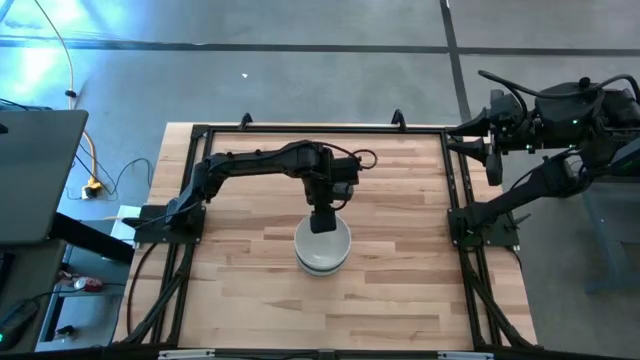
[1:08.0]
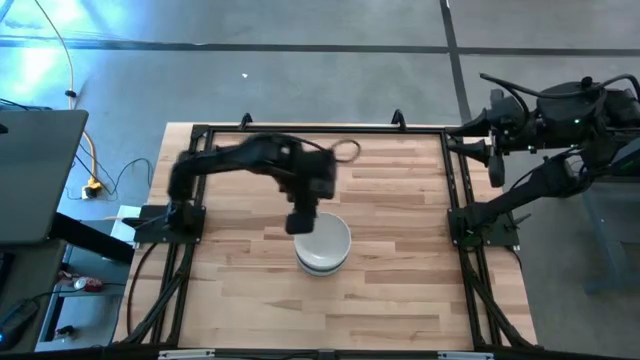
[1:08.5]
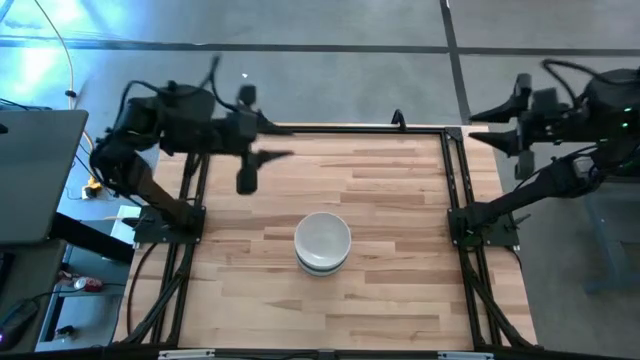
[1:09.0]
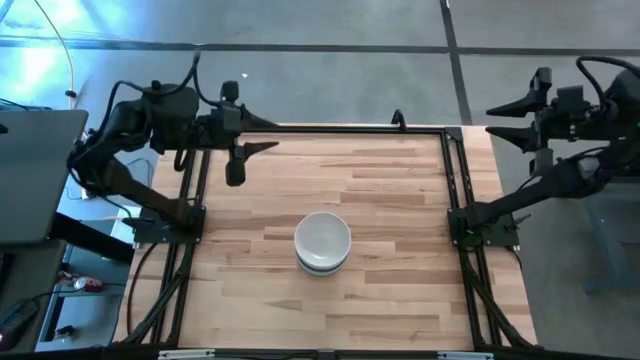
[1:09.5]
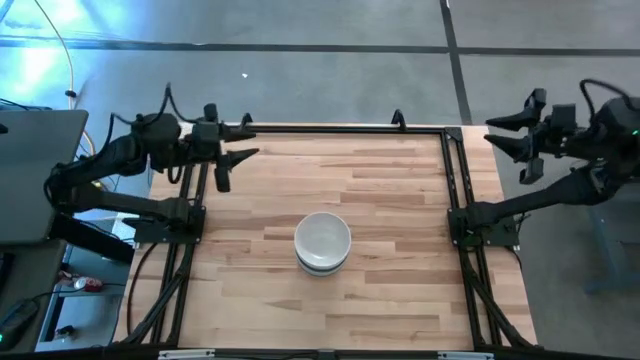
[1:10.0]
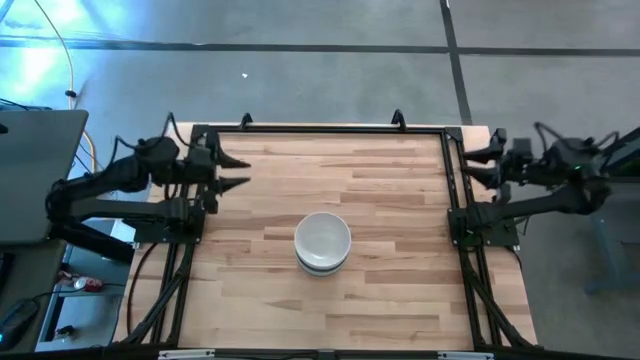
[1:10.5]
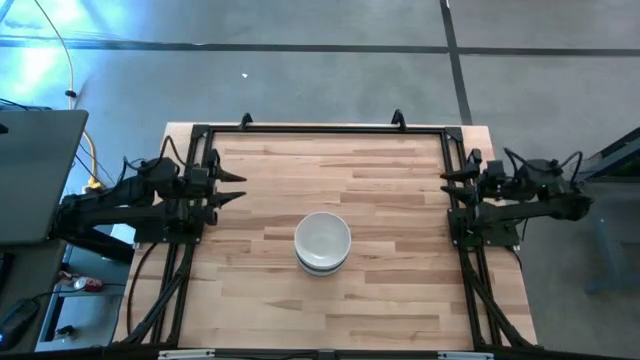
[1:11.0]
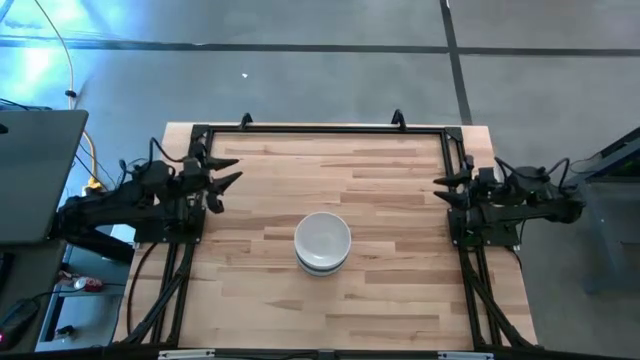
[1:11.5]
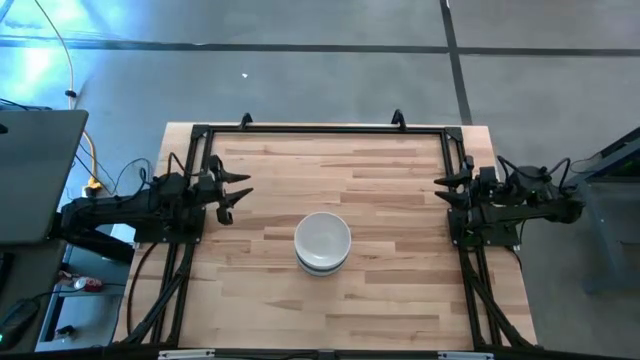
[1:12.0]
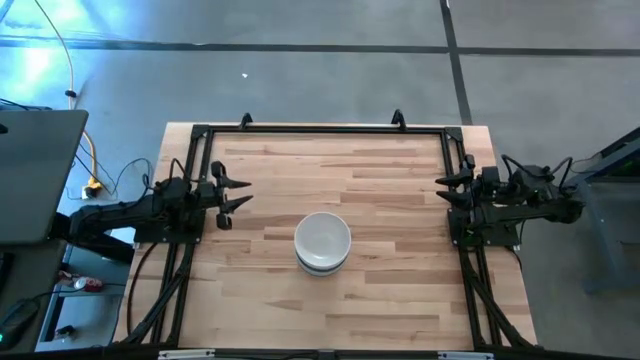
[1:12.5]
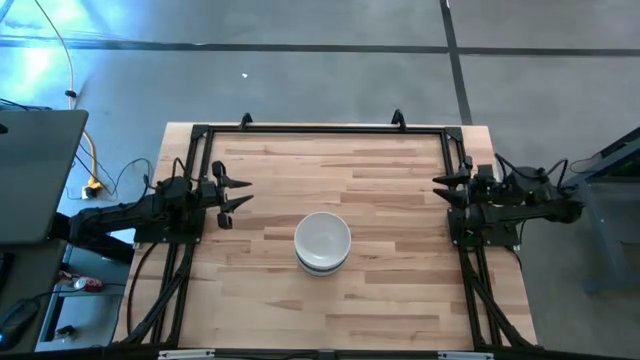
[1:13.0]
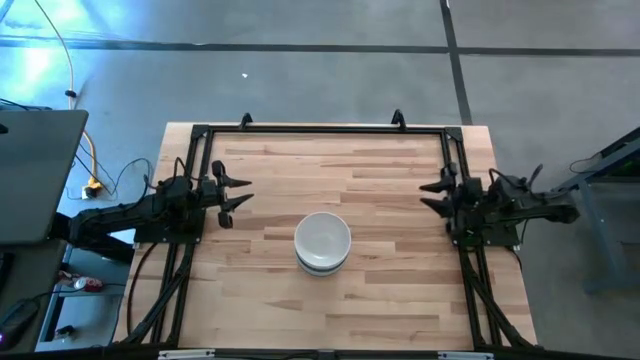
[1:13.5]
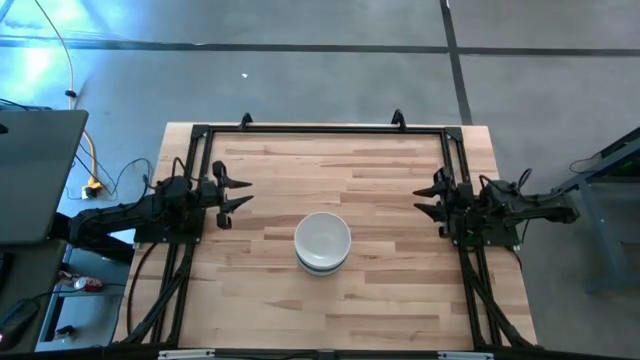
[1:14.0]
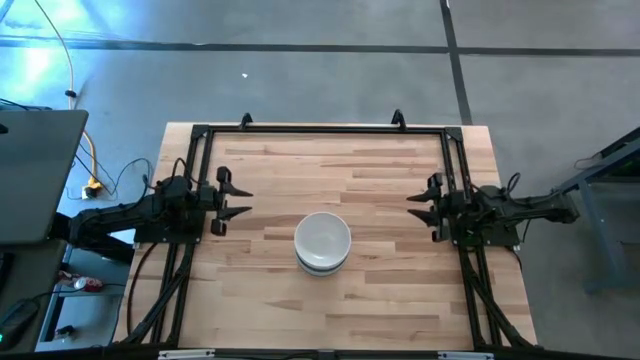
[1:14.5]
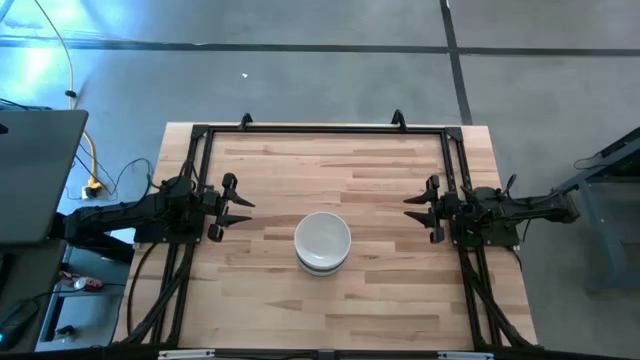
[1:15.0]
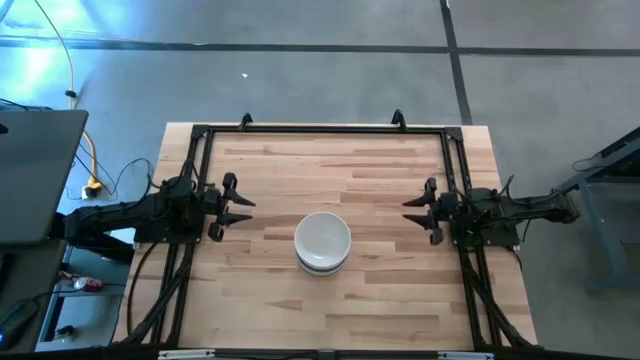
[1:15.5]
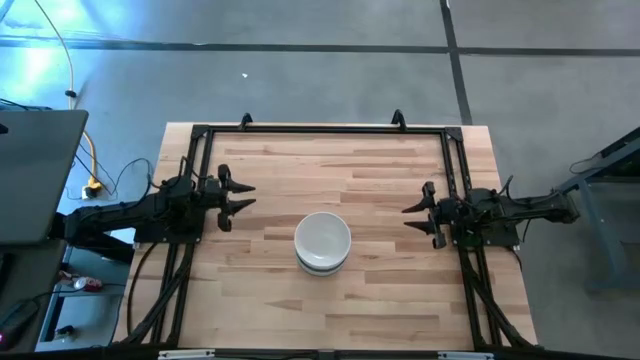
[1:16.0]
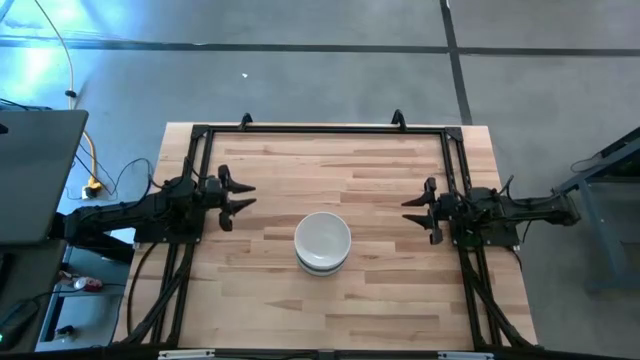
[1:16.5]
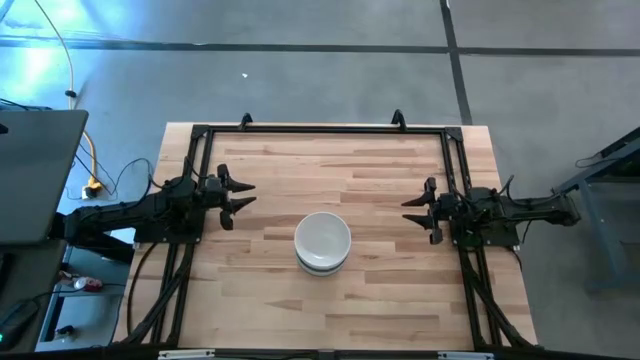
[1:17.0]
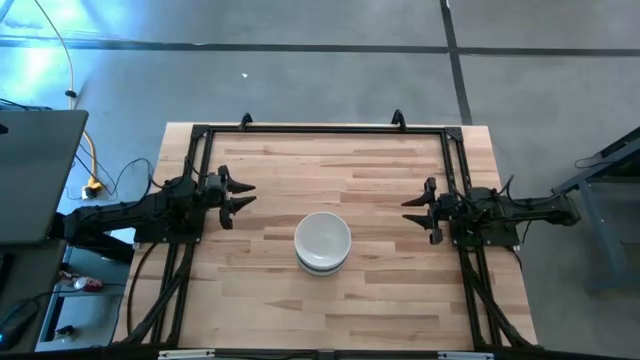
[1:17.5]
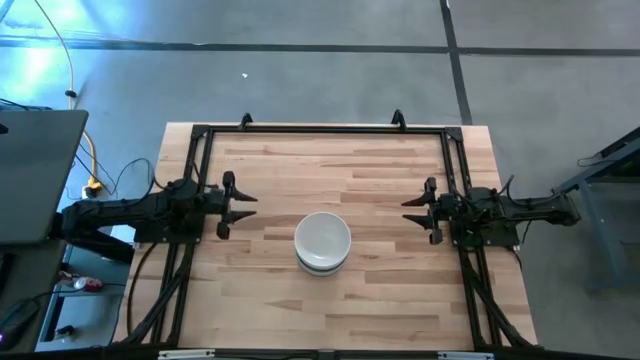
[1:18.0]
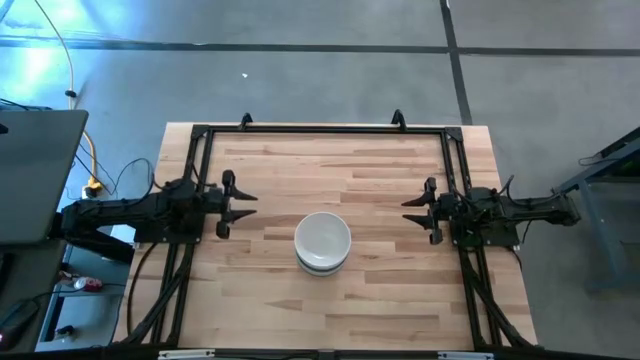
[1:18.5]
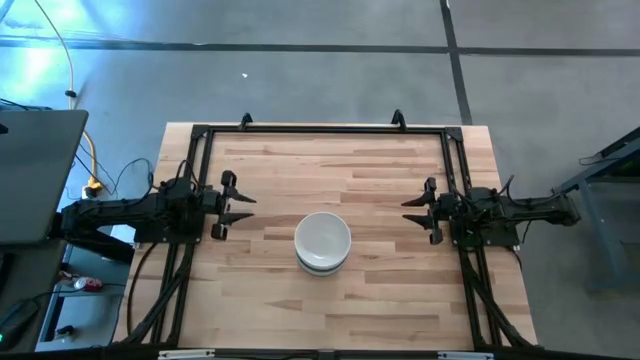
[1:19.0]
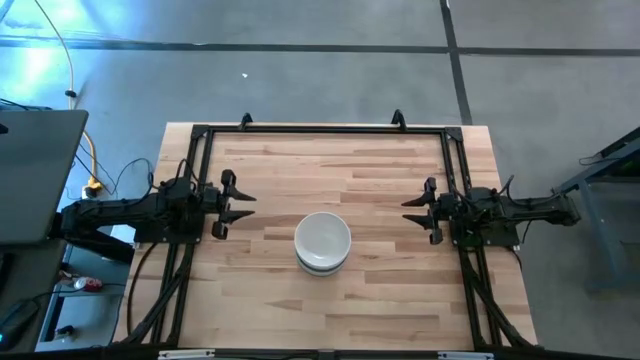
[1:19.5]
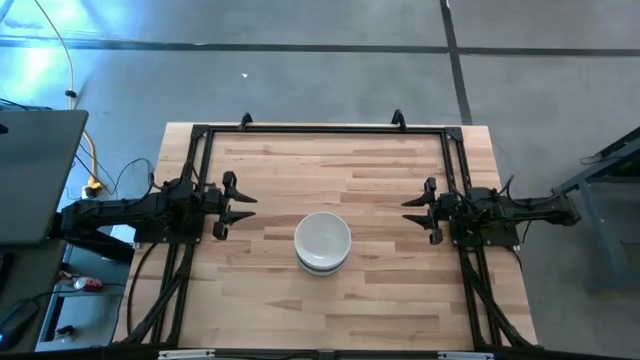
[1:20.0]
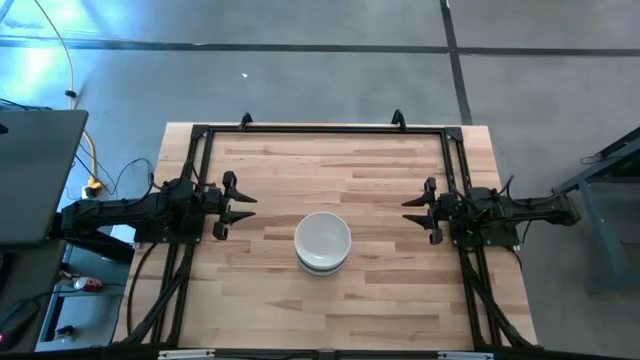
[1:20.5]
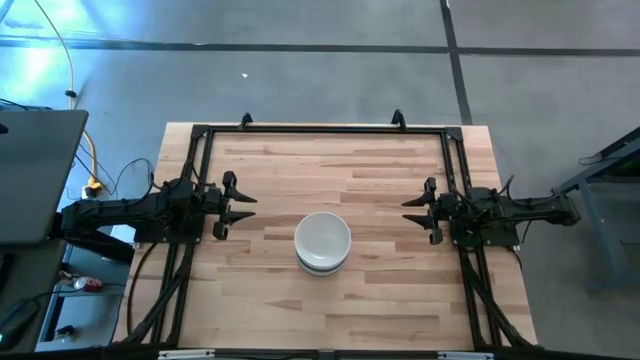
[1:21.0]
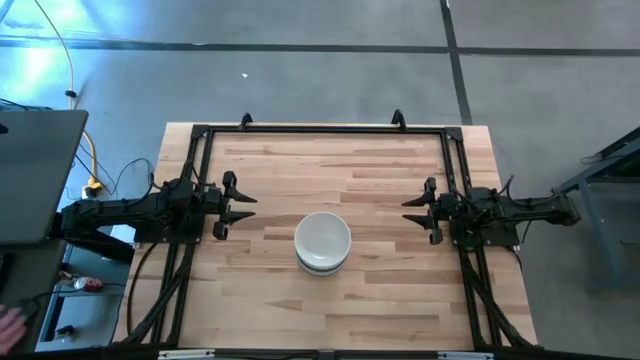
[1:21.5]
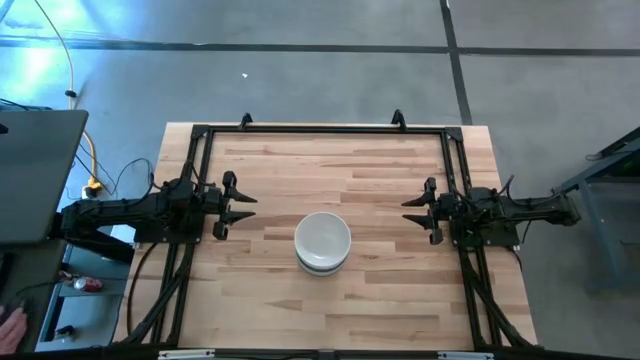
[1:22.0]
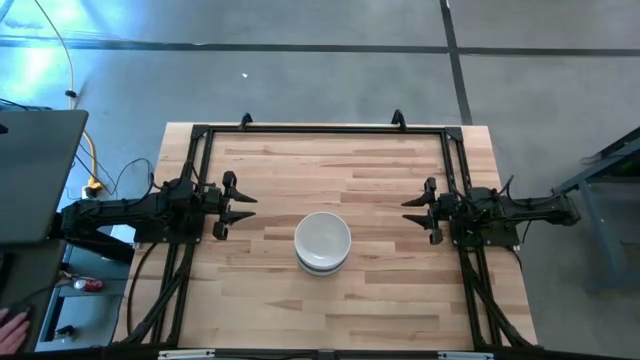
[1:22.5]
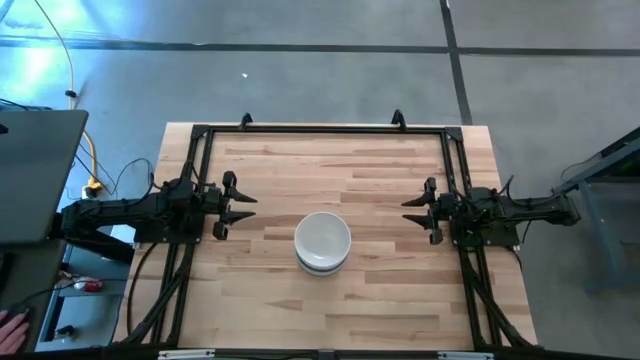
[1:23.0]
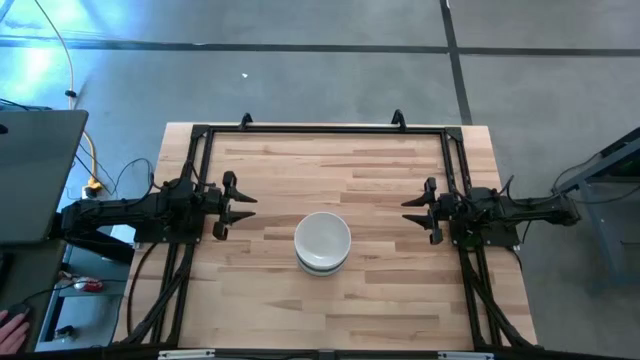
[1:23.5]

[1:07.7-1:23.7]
Task: Nest bowls inside each other
Return to Home Position

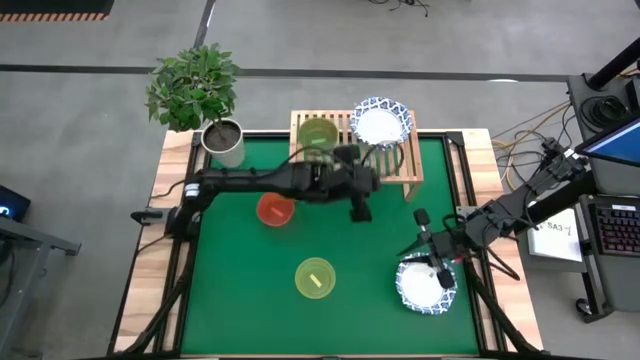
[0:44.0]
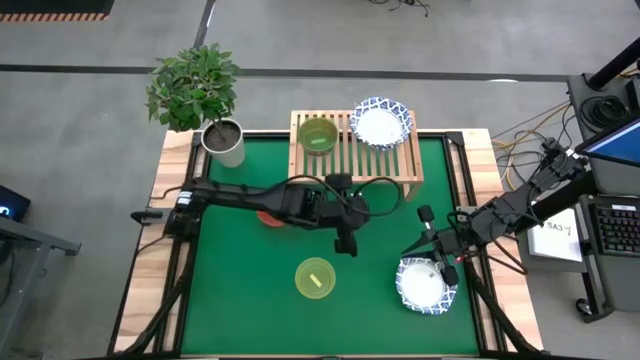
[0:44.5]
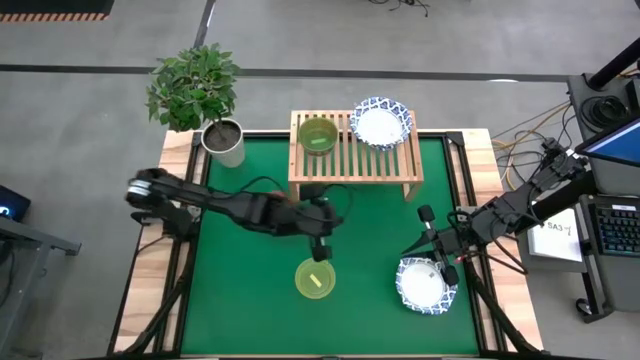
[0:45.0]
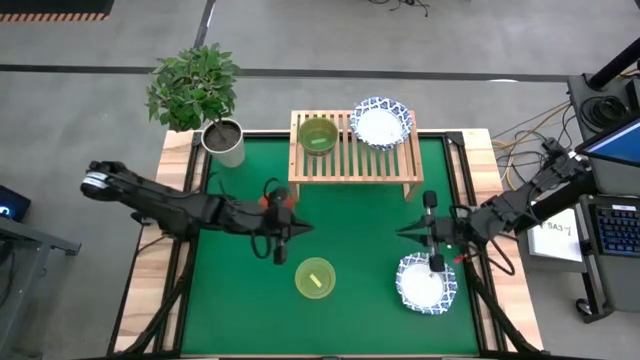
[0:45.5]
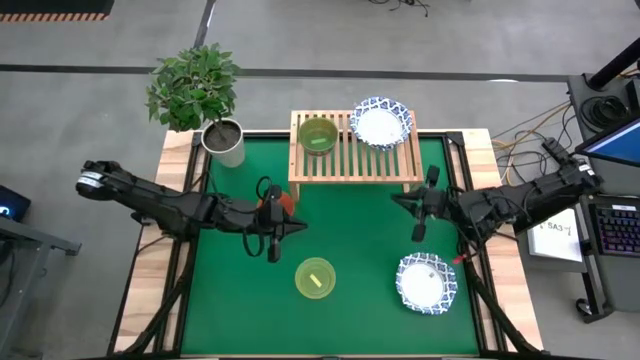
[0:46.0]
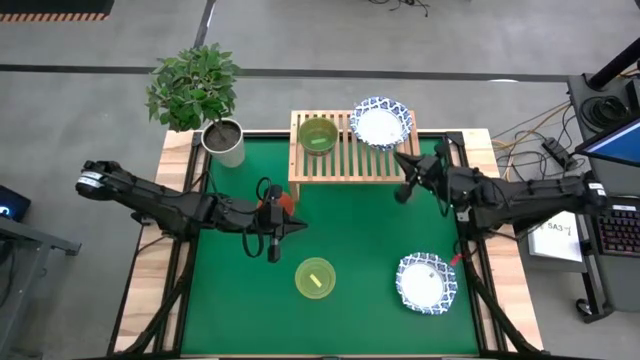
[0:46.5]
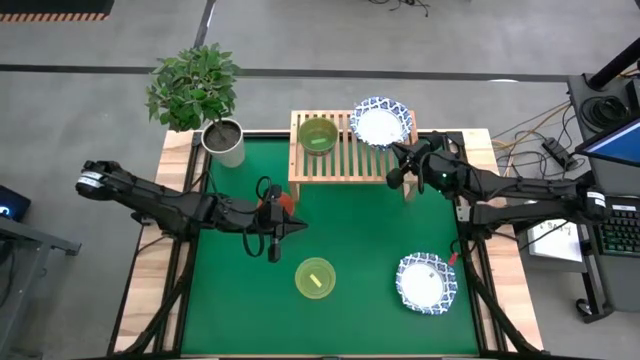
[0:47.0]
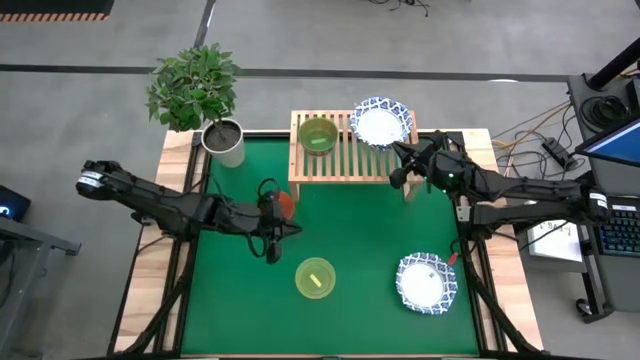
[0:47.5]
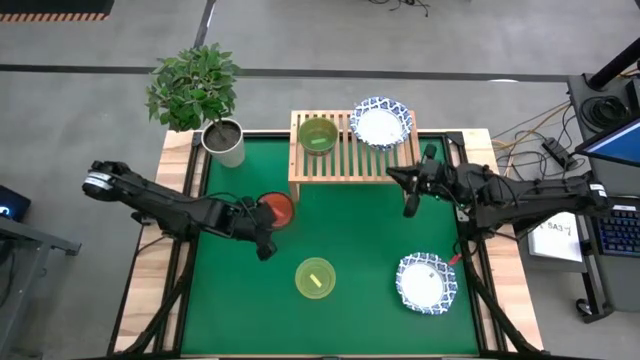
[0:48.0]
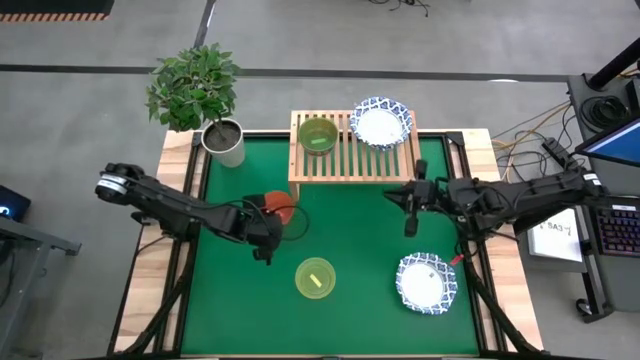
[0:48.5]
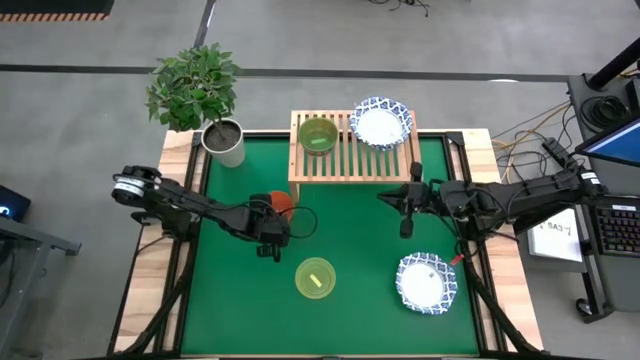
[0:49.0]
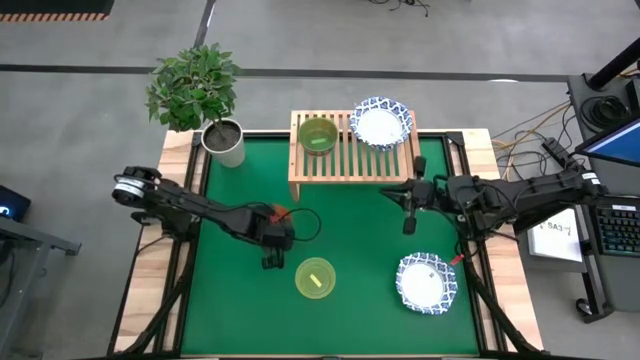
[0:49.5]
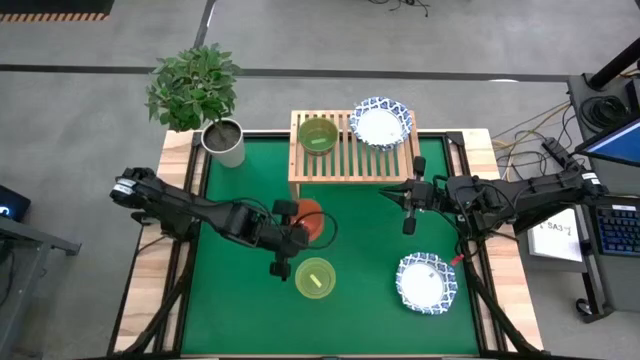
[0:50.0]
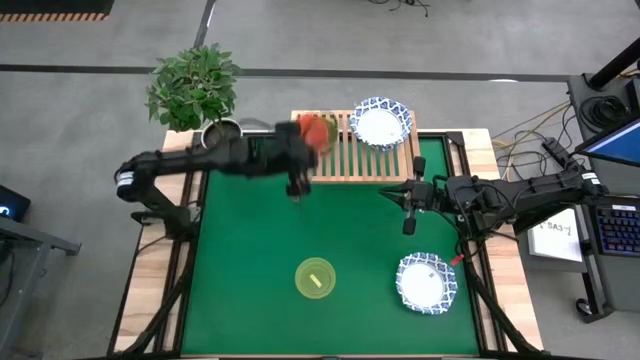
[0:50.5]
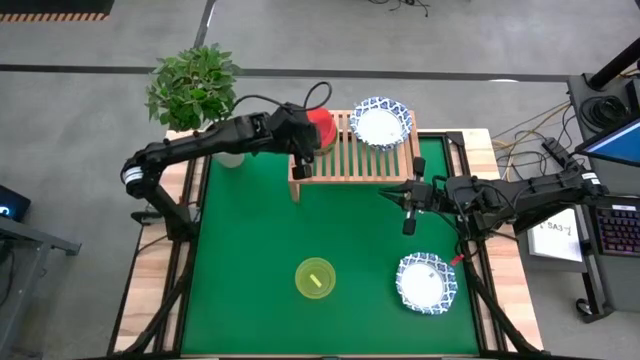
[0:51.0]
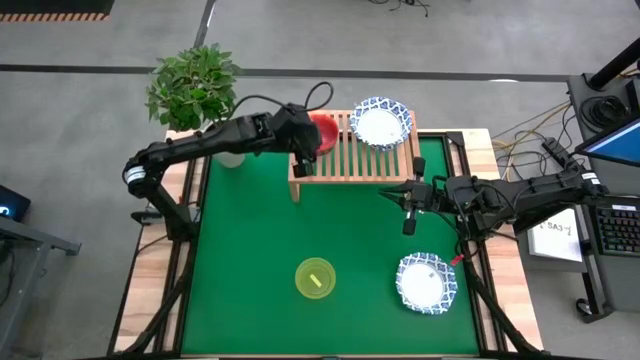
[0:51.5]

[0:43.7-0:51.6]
Task: Place and stack bowls onto a shelf
Stack the orange bowl on top of the green bowl on the shelf
